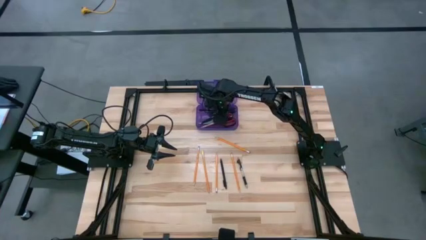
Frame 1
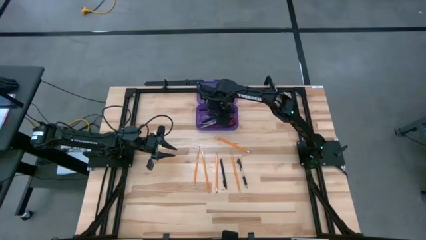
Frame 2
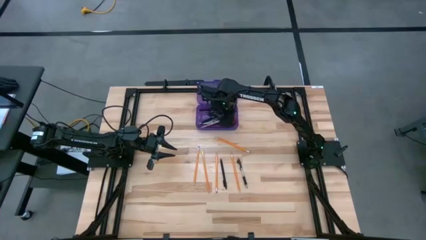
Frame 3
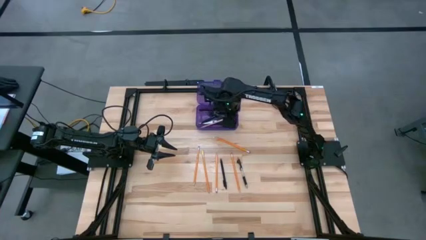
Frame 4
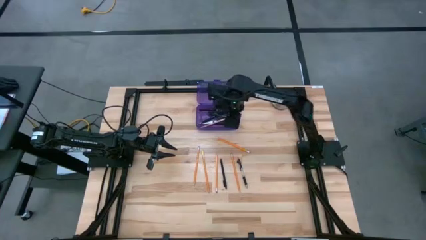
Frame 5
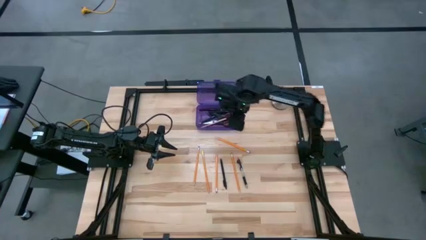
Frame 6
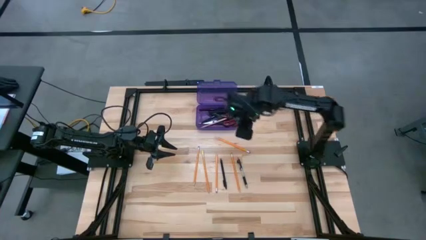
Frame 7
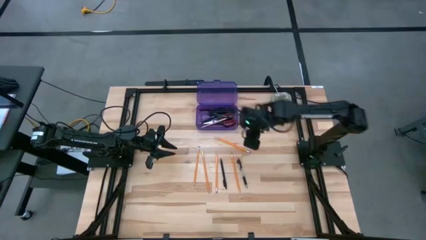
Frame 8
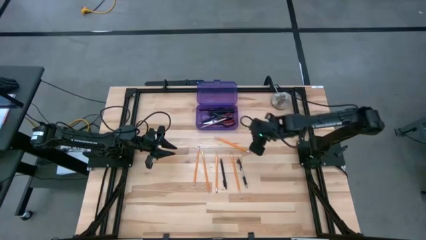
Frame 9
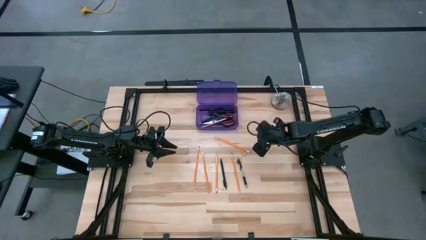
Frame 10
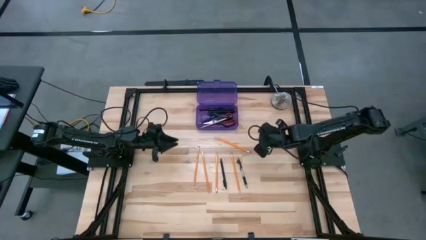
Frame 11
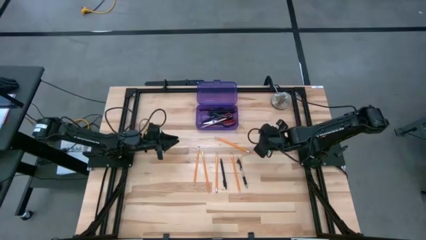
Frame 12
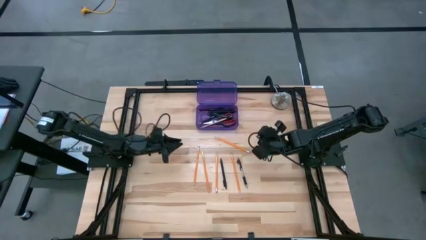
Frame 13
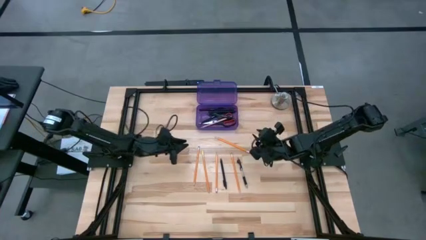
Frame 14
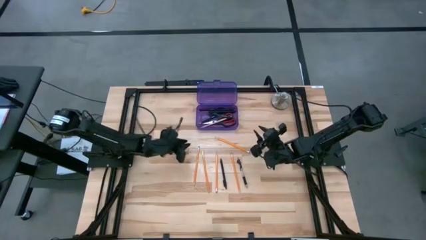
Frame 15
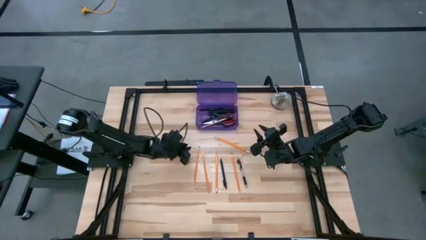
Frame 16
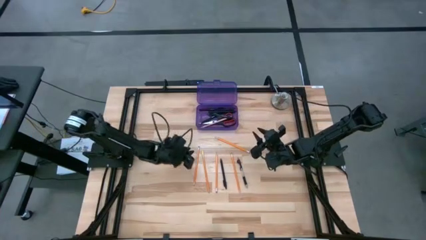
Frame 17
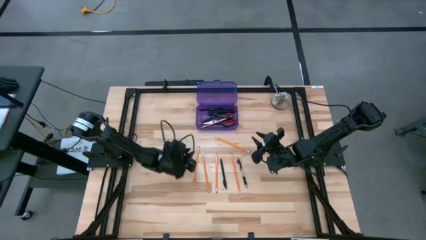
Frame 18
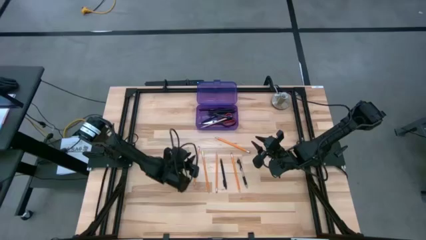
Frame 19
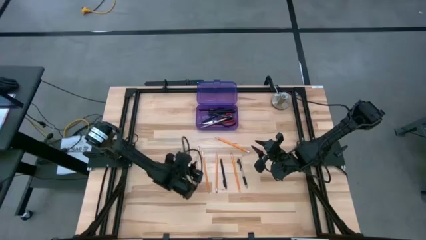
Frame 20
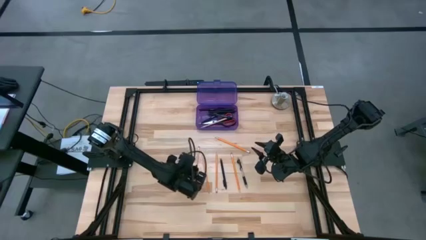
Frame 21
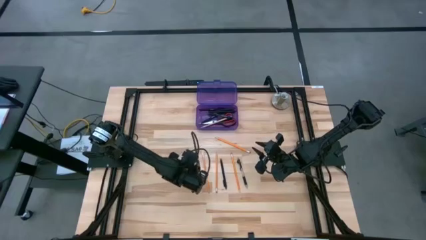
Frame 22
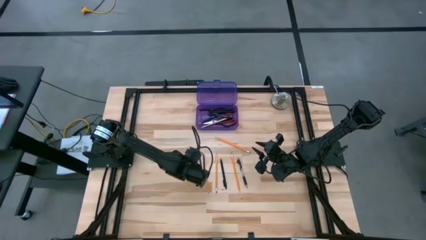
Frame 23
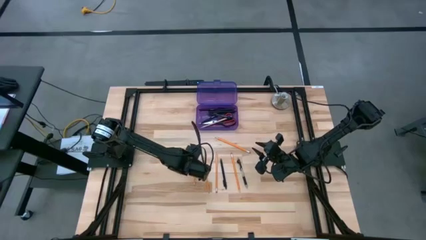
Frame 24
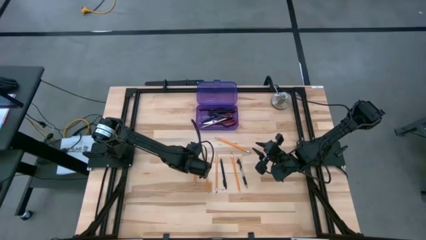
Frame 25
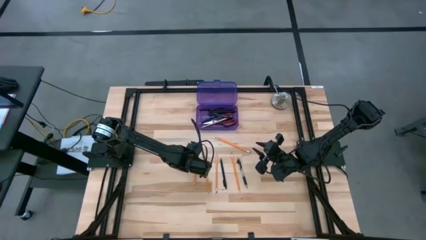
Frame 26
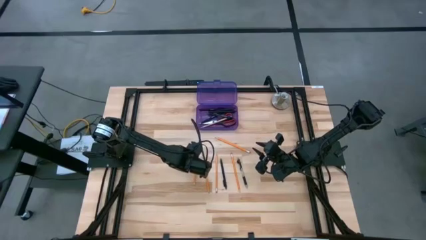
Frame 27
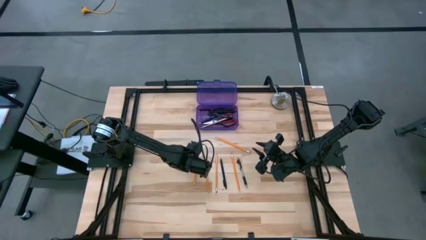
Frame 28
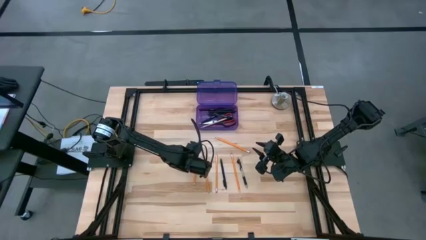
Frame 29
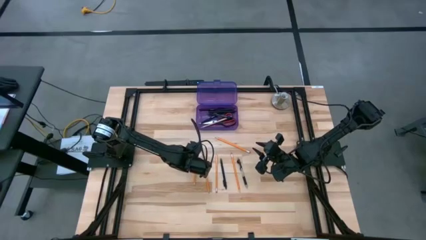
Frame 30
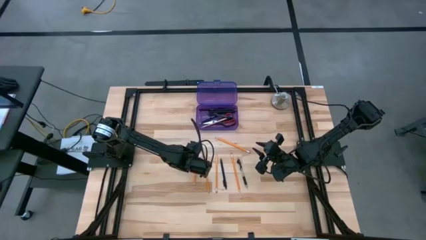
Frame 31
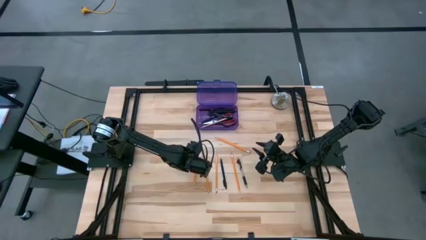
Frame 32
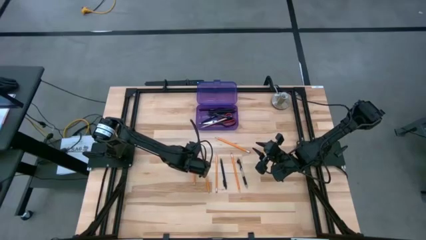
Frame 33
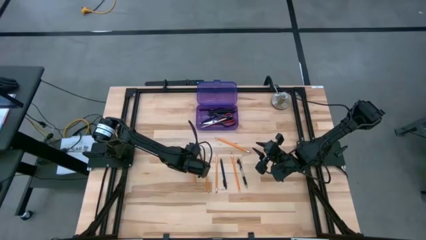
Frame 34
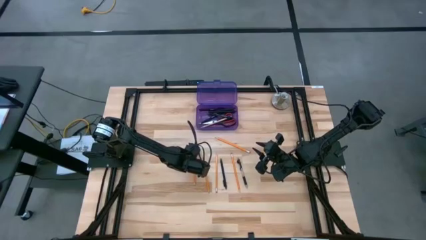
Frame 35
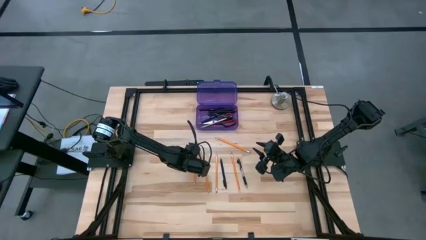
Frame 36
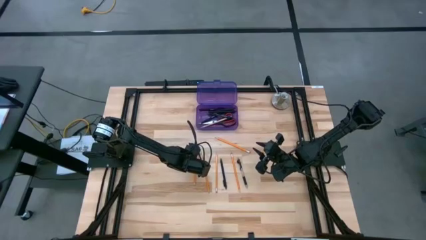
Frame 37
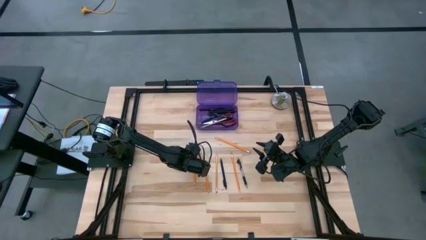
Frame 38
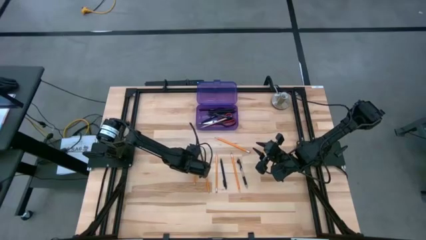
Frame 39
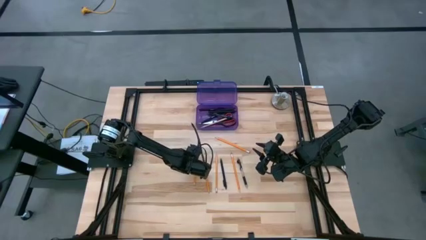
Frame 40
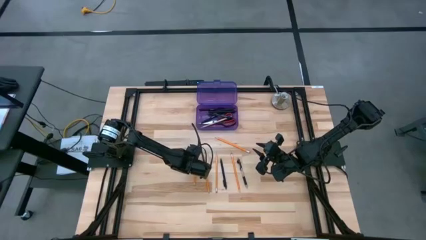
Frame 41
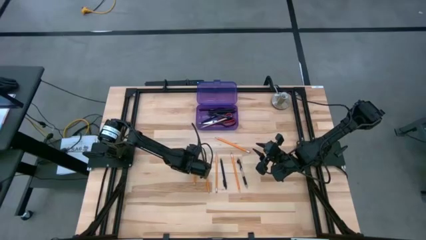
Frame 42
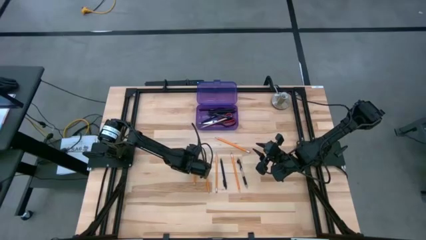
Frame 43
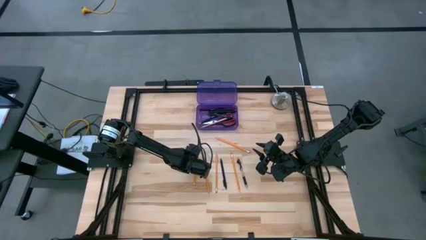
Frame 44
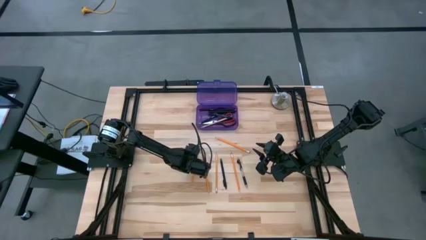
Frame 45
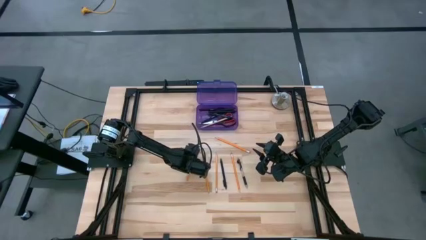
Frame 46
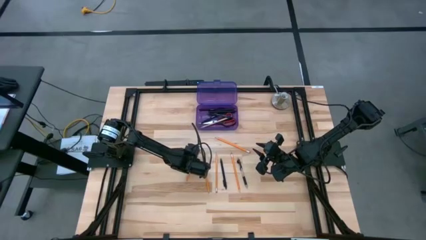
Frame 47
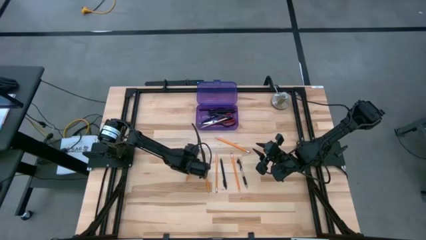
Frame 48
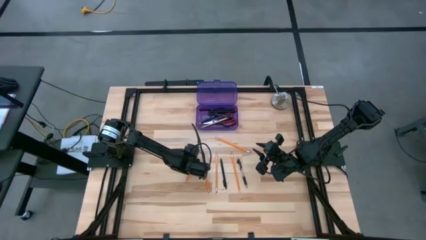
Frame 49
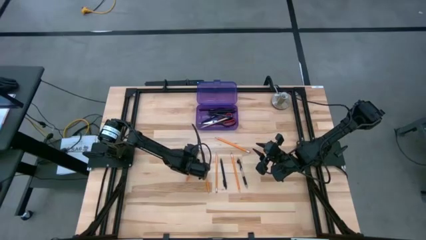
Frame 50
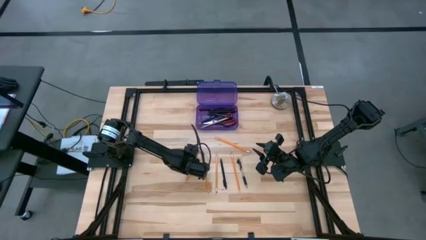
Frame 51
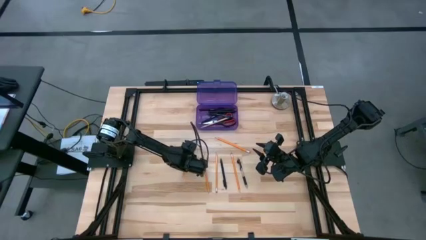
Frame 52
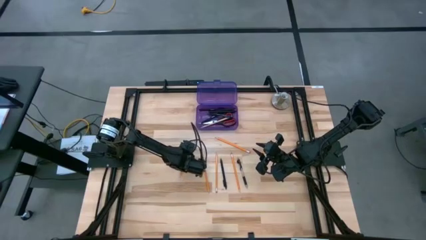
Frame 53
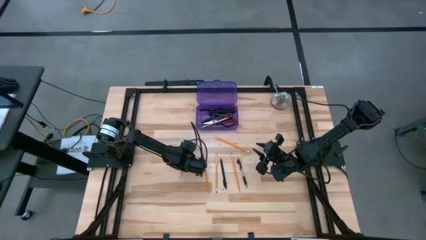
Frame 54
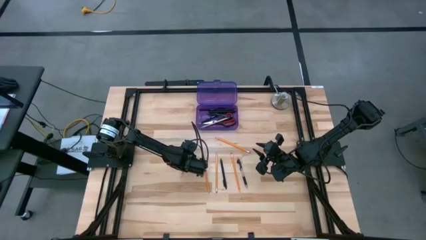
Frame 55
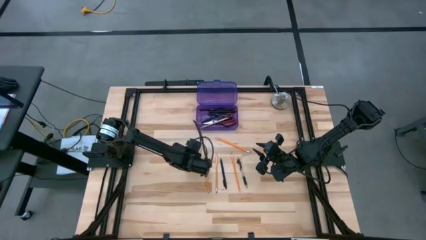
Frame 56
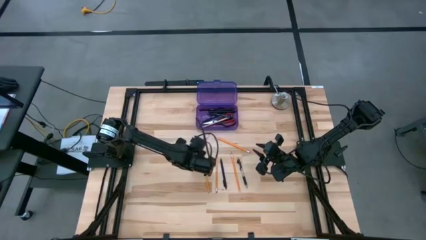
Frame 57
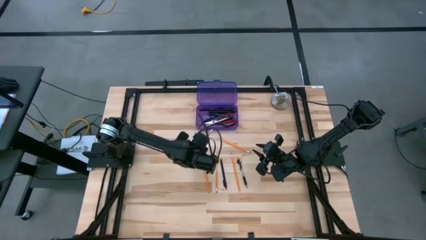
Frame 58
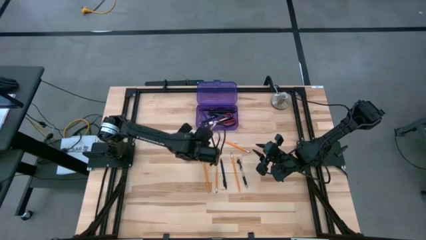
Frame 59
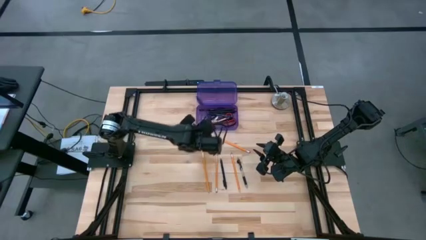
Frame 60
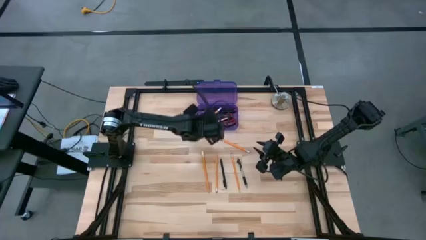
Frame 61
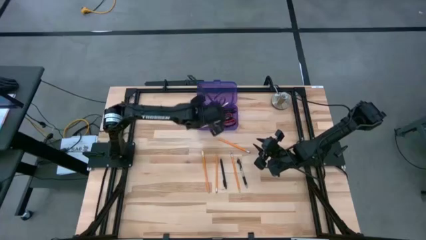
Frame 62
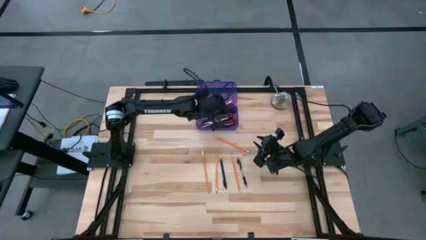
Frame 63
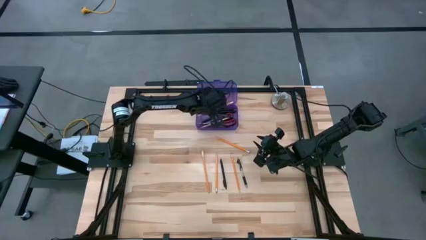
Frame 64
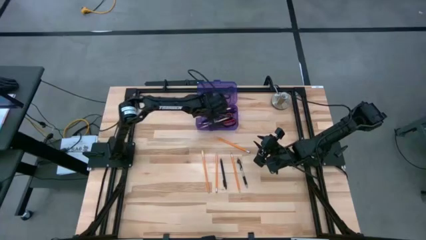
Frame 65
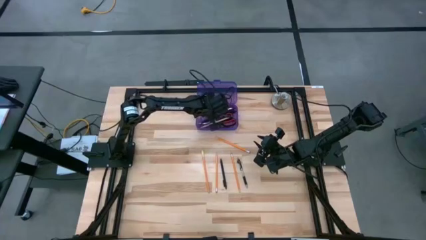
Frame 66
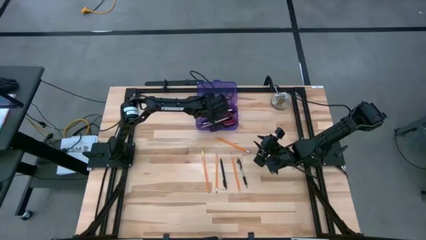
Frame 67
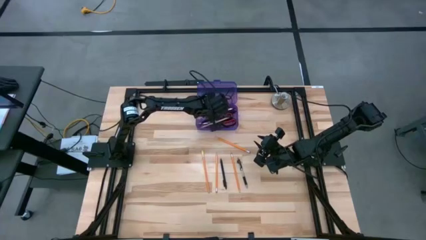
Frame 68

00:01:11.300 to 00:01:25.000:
Task: Pick & place school supplies into a supply box
Put the orange pencil into the violet supply box

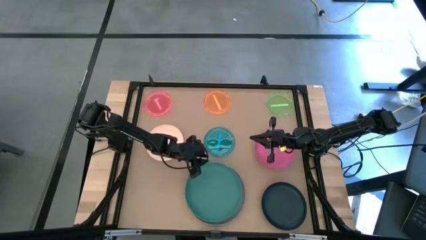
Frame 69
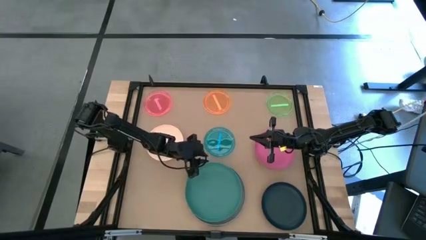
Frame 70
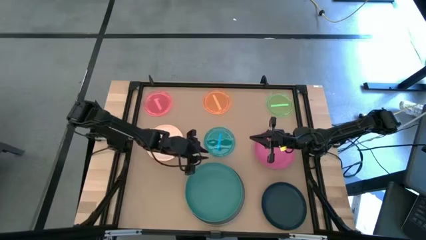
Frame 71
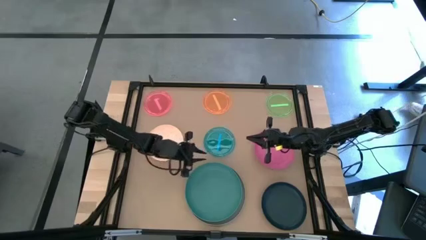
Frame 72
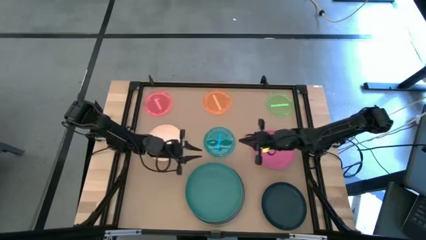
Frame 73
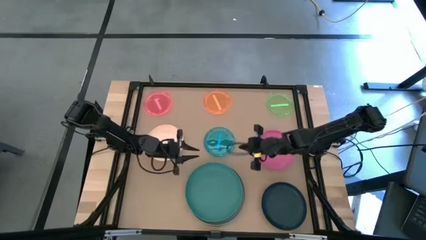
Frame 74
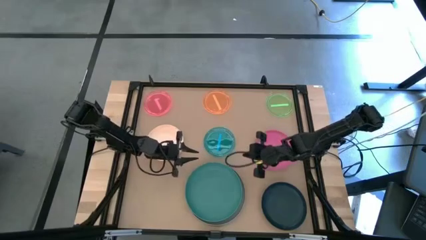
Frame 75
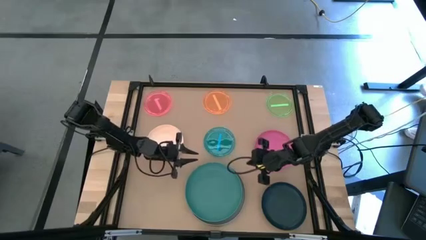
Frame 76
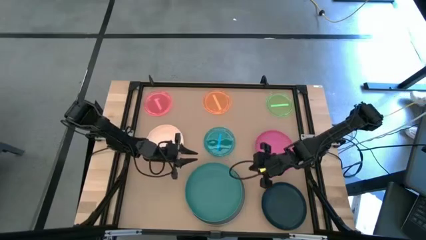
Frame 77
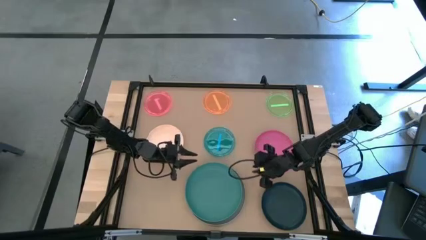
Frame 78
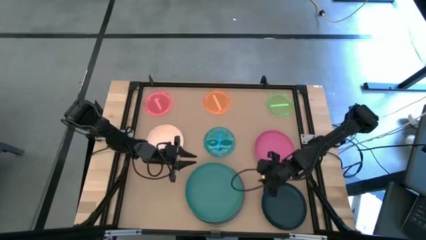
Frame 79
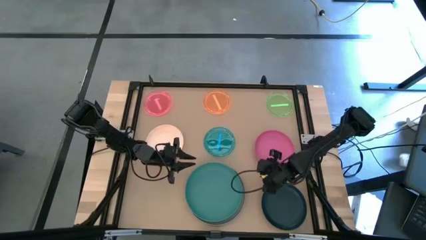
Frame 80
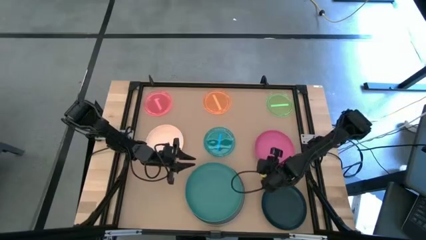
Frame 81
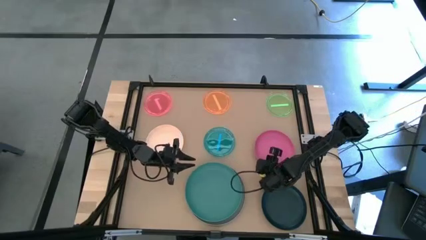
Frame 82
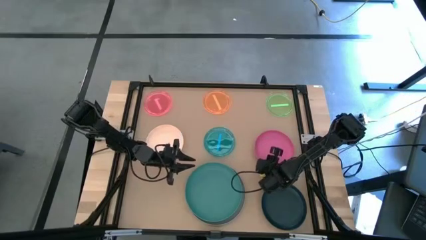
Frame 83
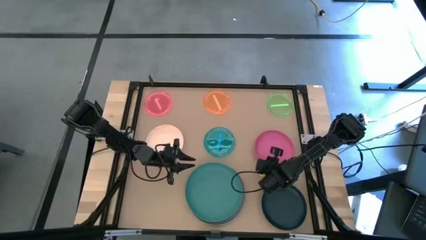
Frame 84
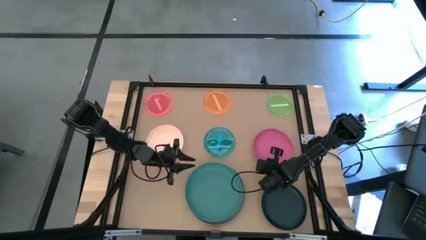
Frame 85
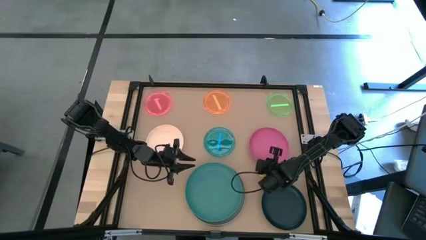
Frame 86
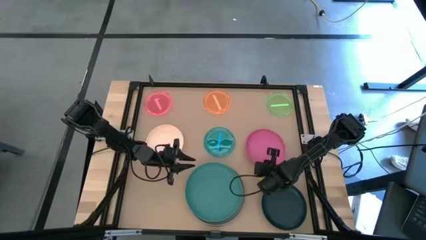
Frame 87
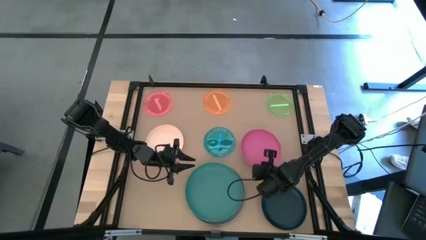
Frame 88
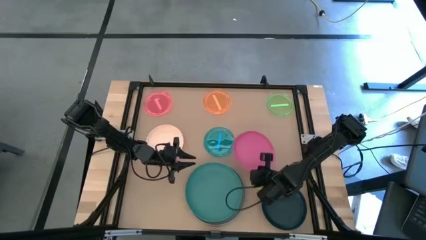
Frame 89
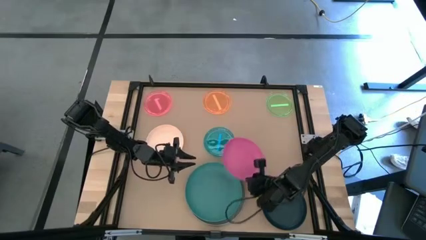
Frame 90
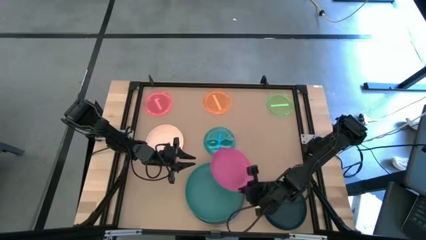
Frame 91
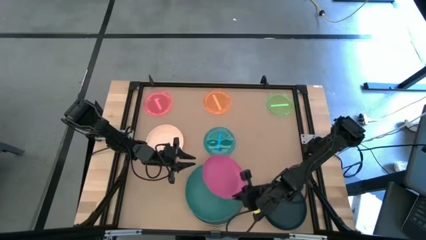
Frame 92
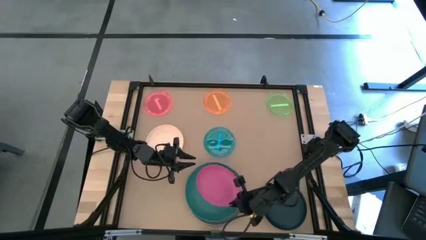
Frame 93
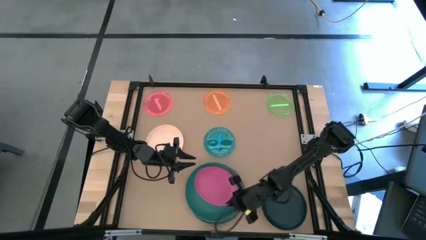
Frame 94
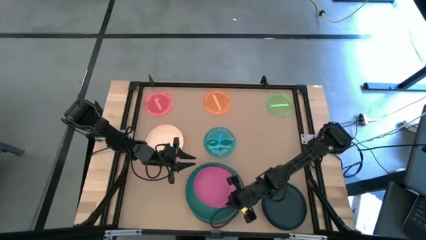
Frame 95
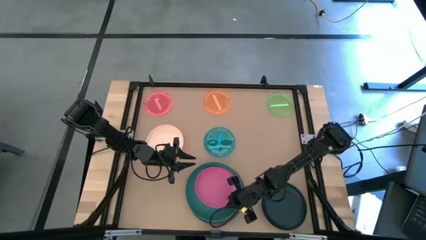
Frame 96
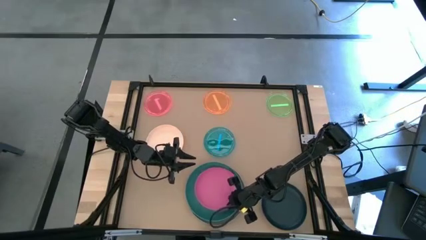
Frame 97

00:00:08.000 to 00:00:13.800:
Task: Stack plastic plates
Stack the pink plate on top of the green plate
